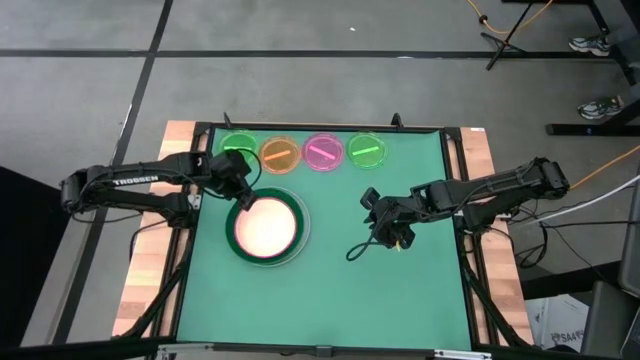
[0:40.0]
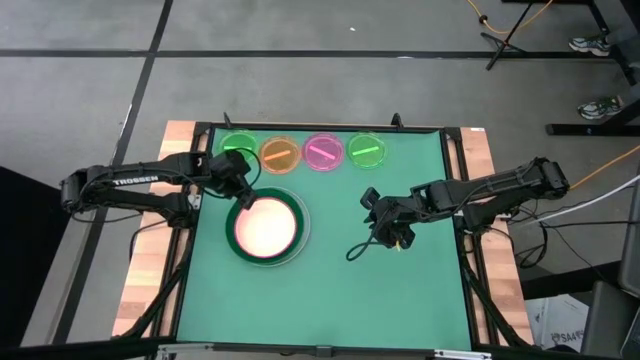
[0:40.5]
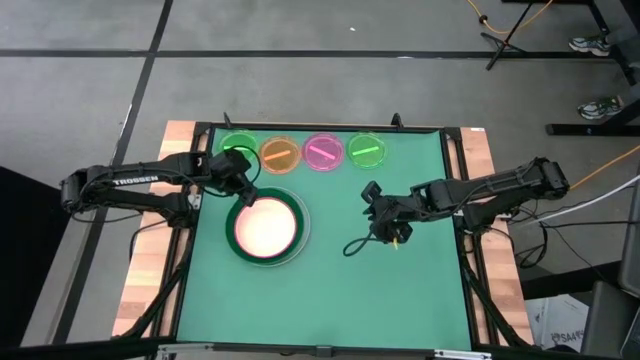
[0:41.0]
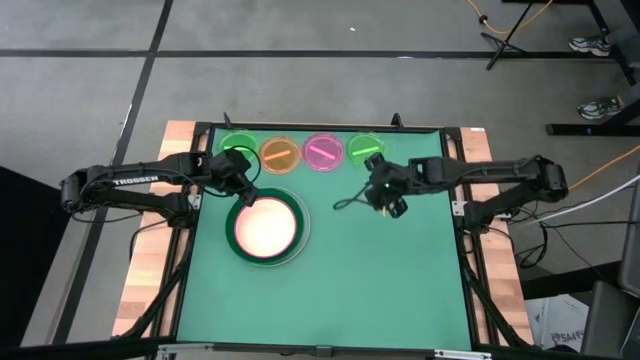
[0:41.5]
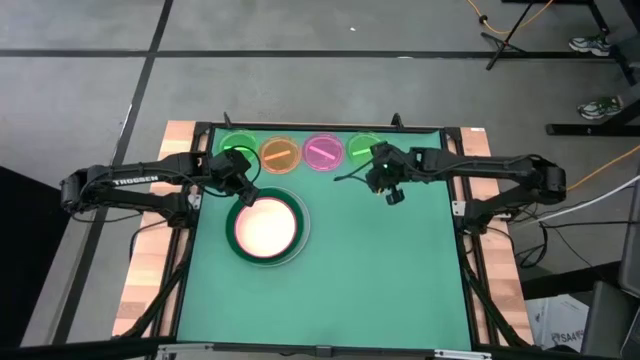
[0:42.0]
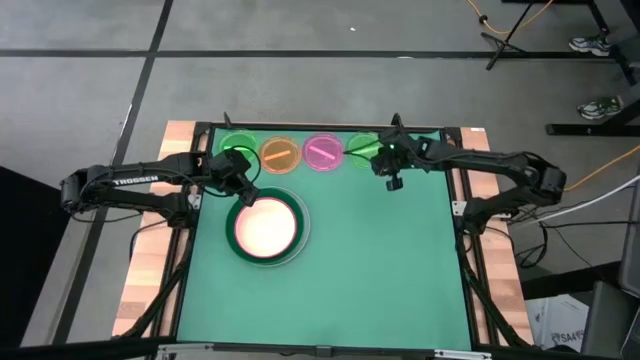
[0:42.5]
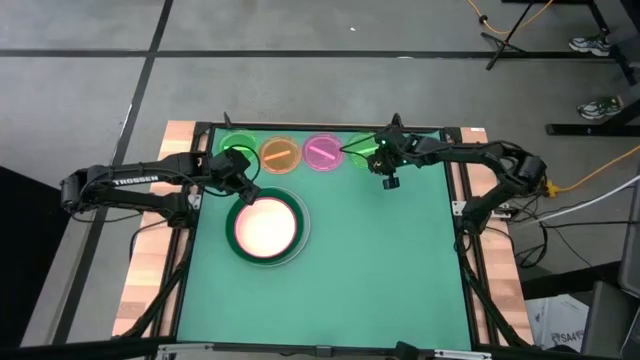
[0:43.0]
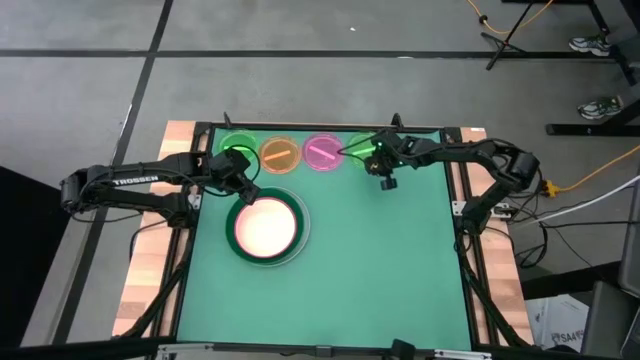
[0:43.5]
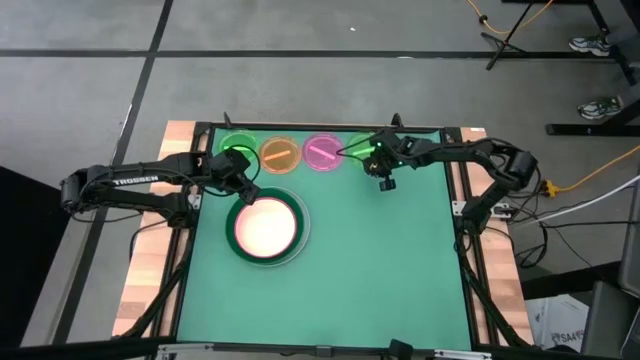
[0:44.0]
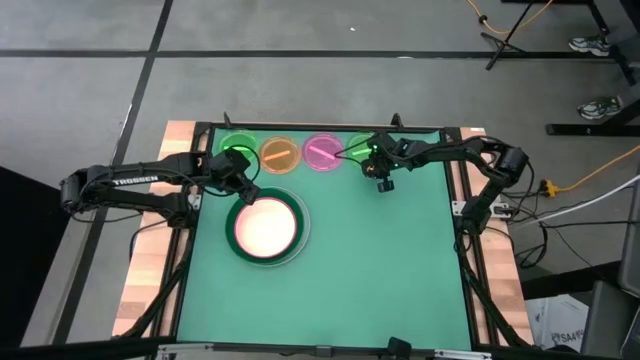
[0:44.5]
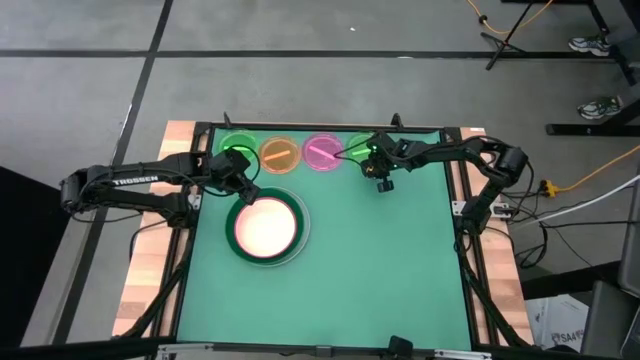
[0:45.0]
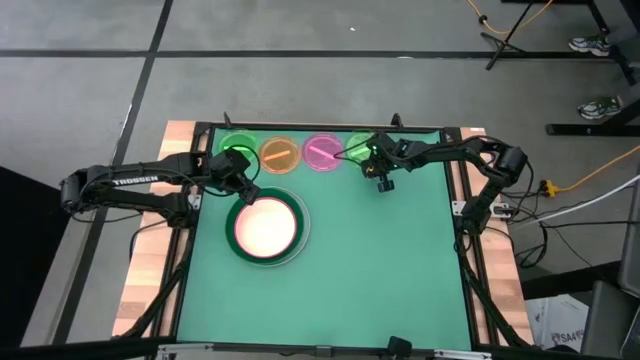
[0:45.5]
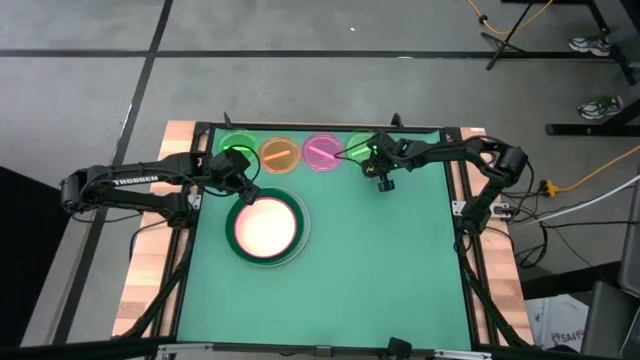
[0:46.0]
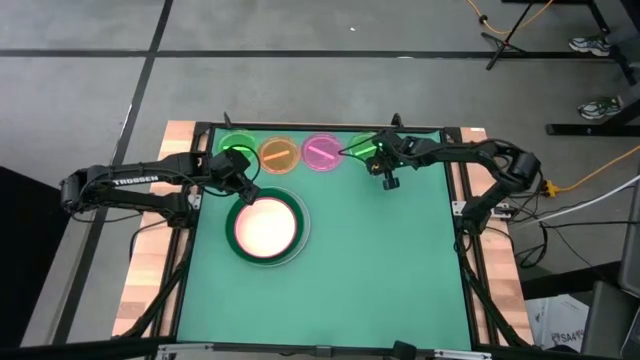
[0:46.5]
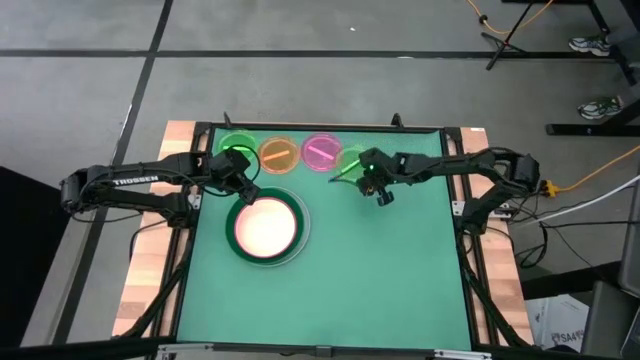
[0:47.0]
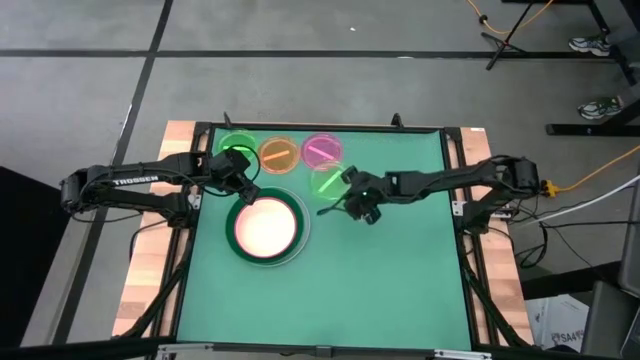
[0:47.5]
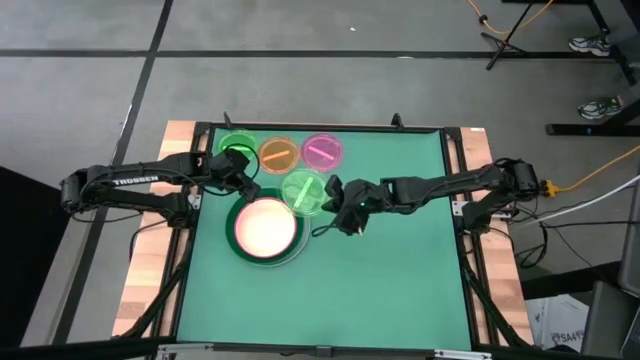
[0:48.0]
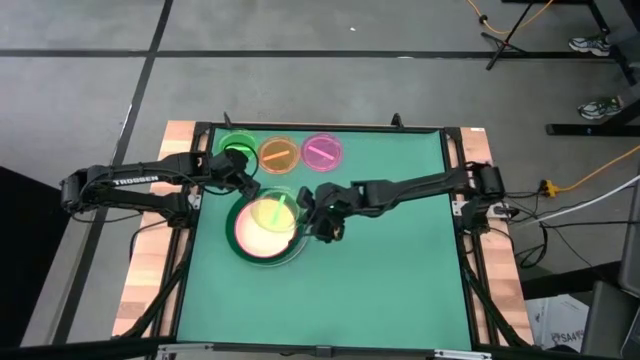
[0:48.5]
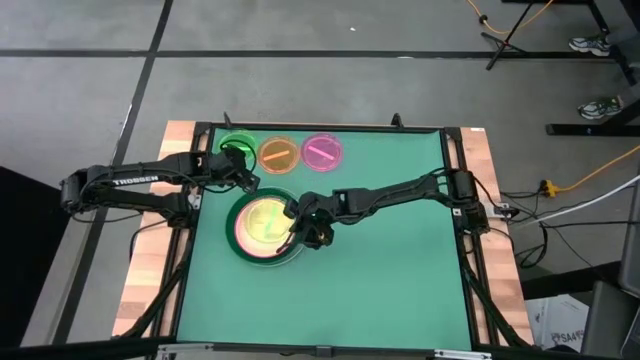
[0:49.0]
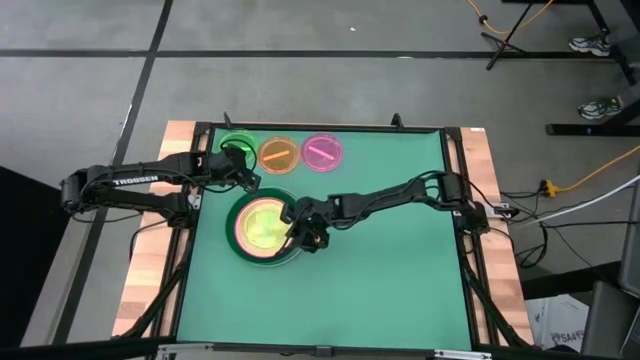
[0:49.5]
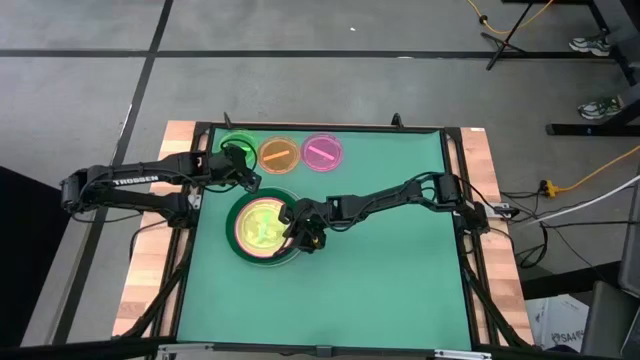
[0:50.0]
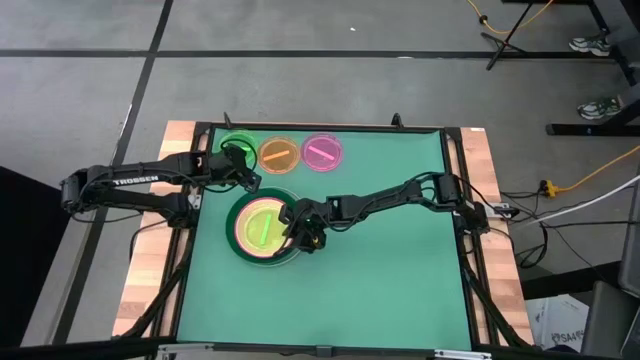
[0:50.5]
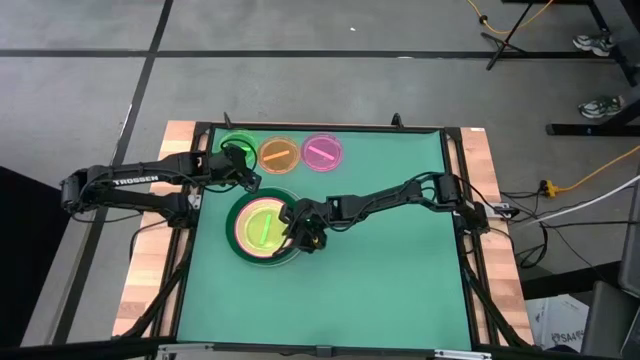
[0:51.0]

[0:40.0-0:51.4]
Task: Stack plastic plates
Stack the right transparent green plate on top of the the light orange plate

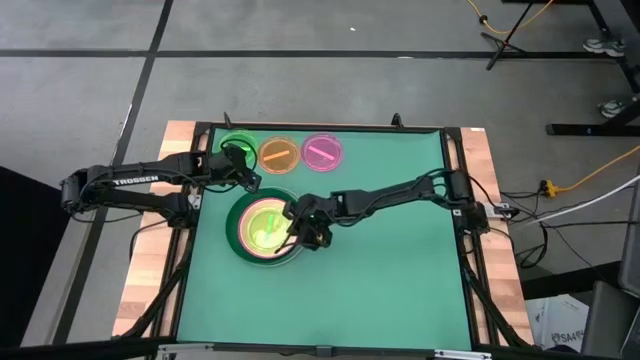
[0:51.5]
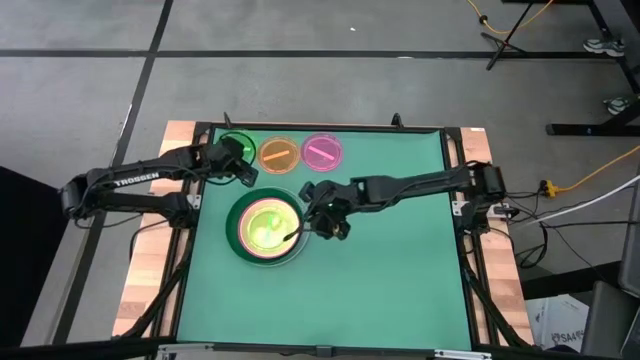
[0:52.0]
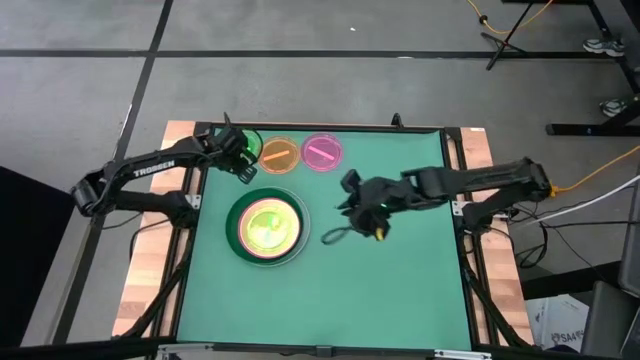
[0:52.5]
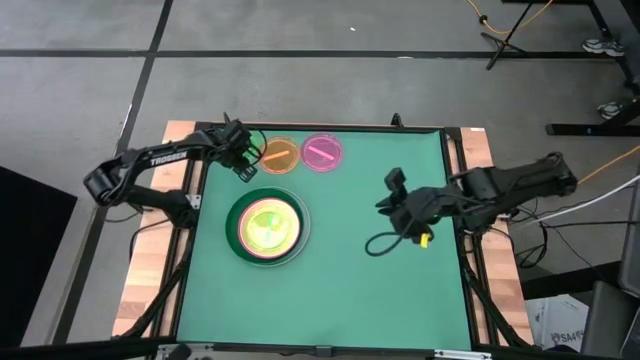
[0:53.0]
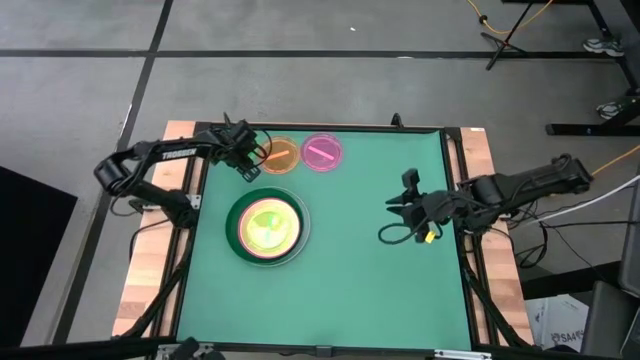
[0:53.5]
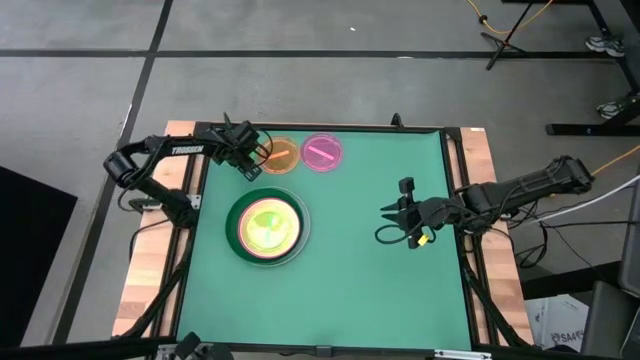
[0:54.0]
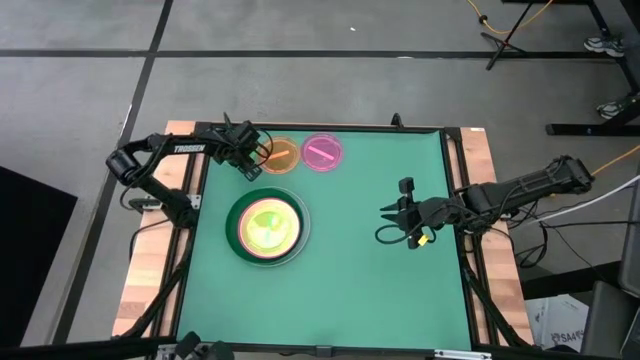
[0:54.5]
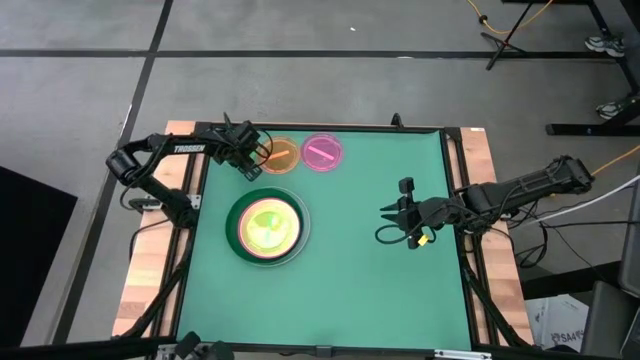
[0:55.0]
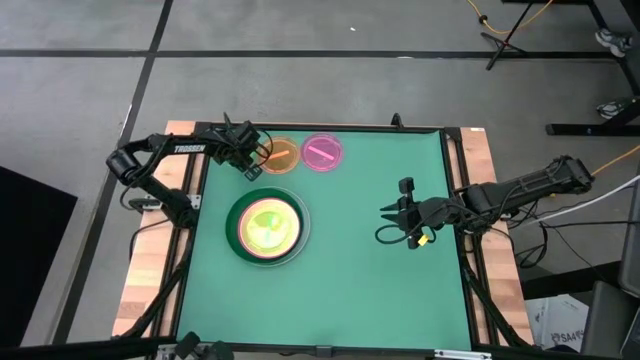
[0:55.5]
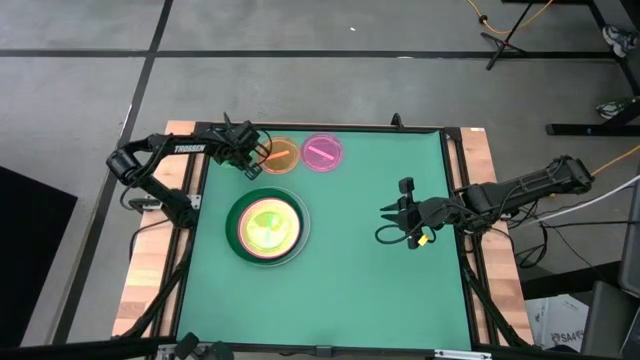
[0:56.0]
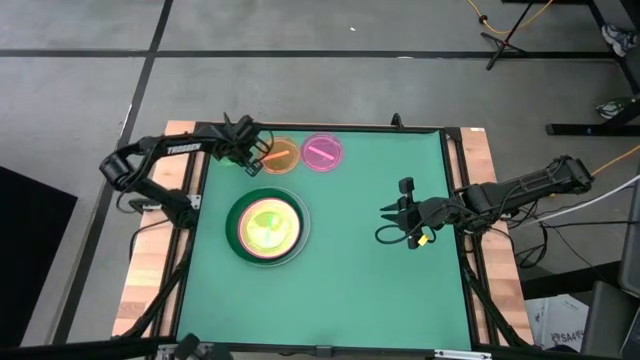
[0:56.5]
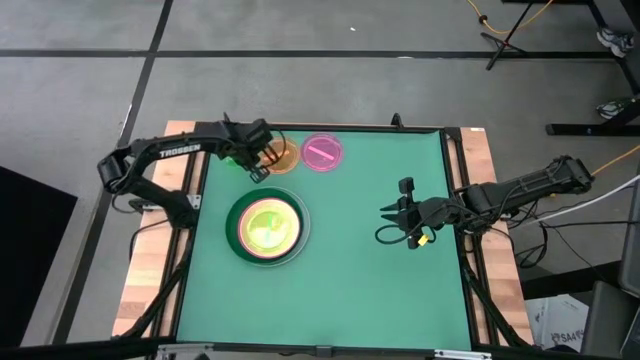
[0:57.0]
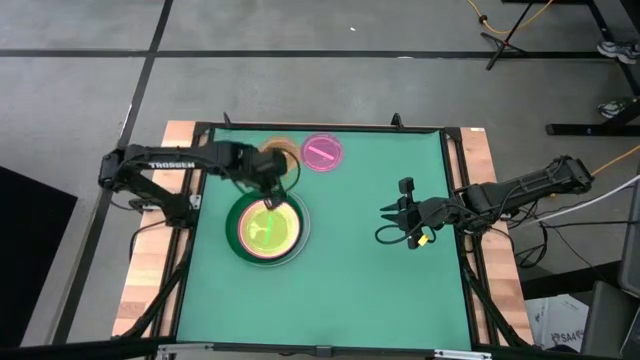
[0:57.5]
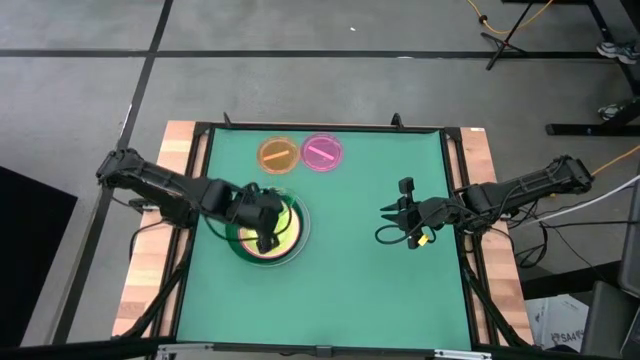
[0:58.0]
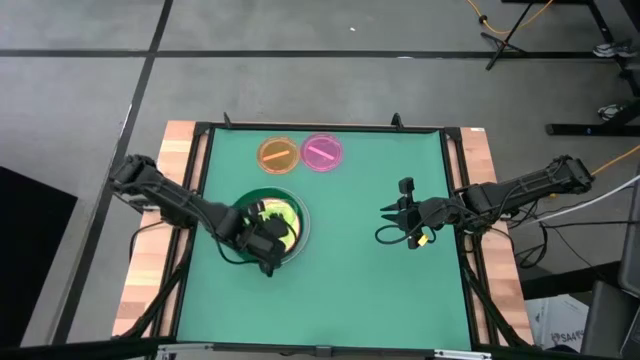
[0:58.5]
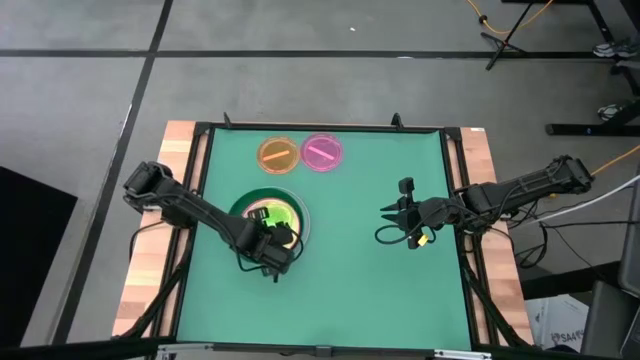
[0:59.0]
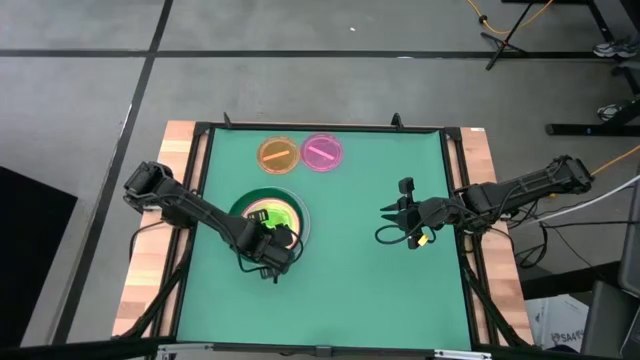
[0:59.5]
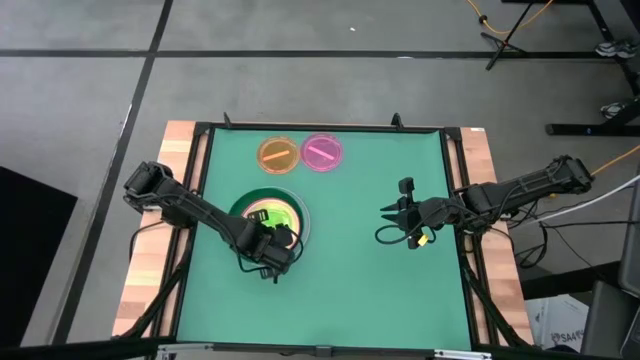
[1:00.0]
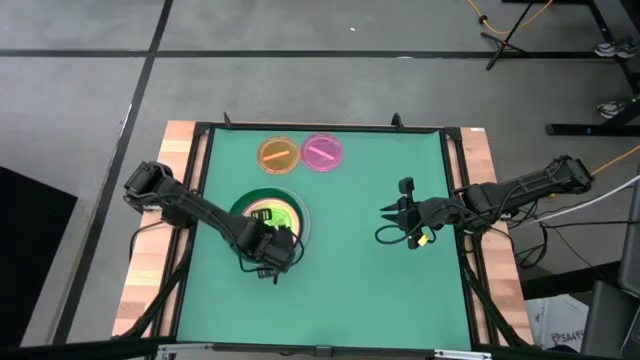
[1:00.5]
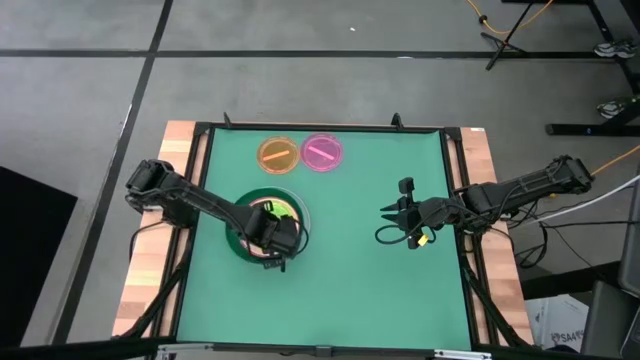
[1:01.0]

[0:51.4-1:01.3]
Stack the transparent green plate on top of the transparent green plate
